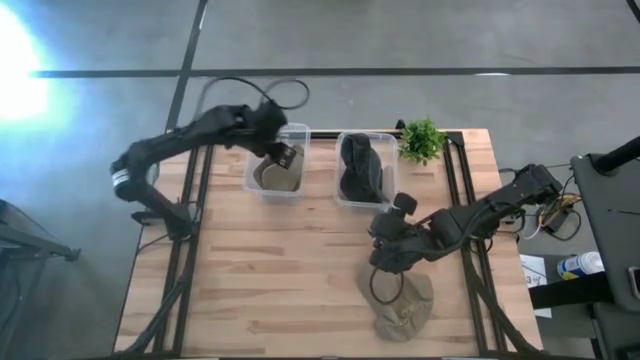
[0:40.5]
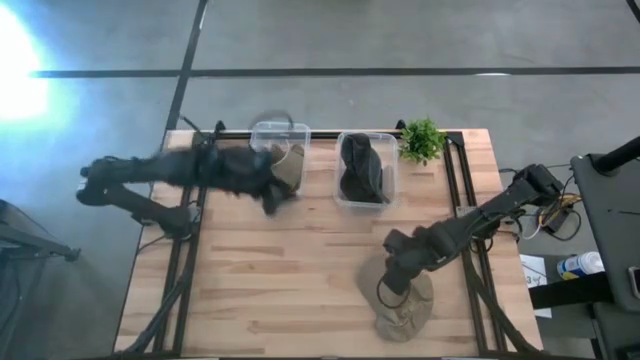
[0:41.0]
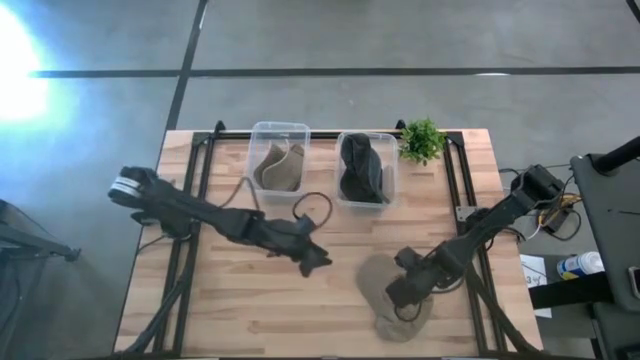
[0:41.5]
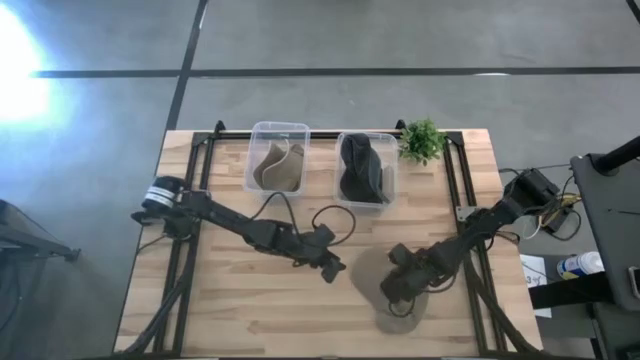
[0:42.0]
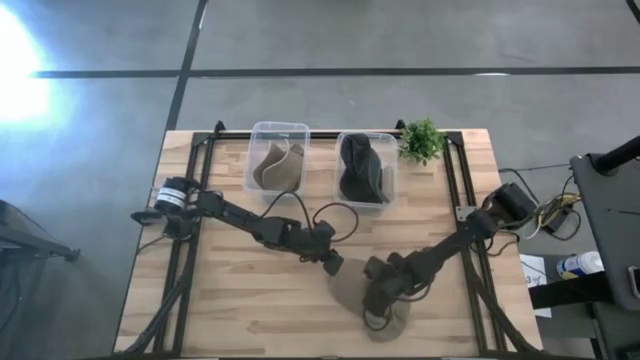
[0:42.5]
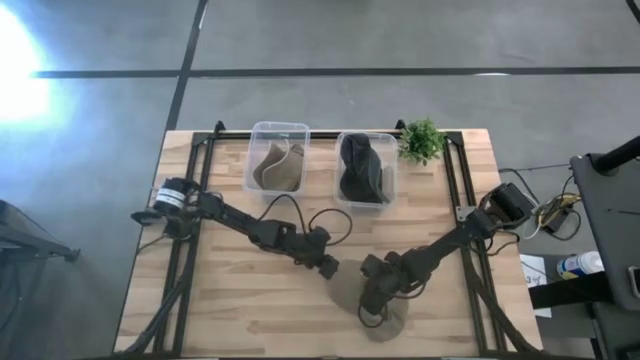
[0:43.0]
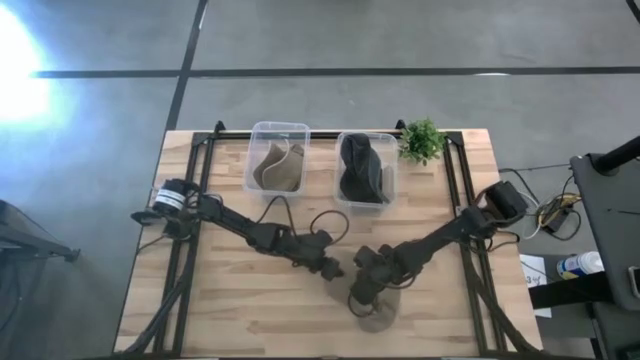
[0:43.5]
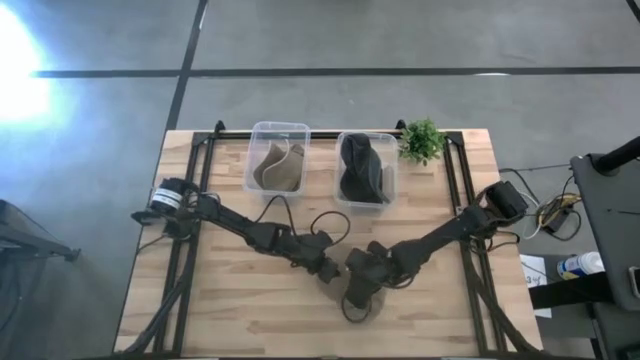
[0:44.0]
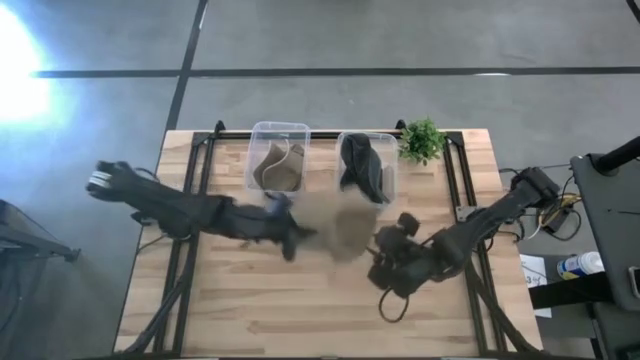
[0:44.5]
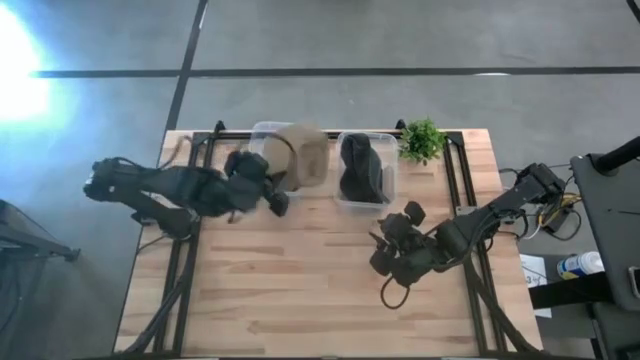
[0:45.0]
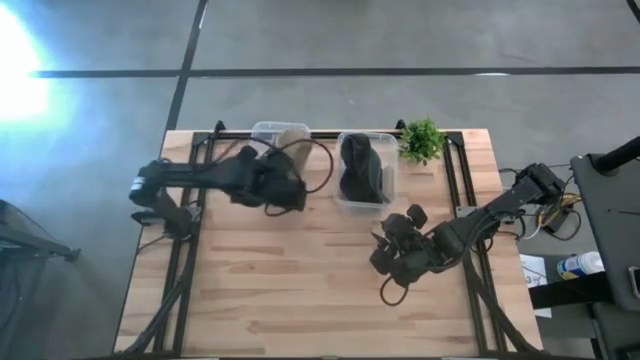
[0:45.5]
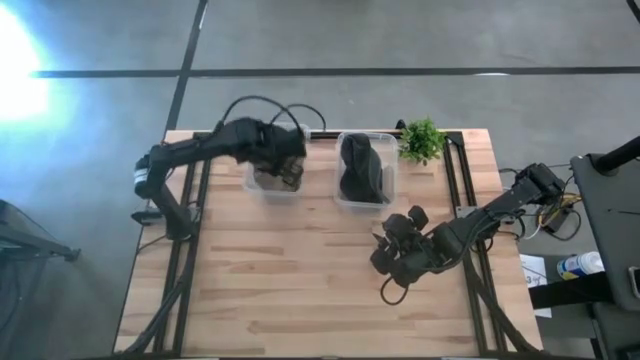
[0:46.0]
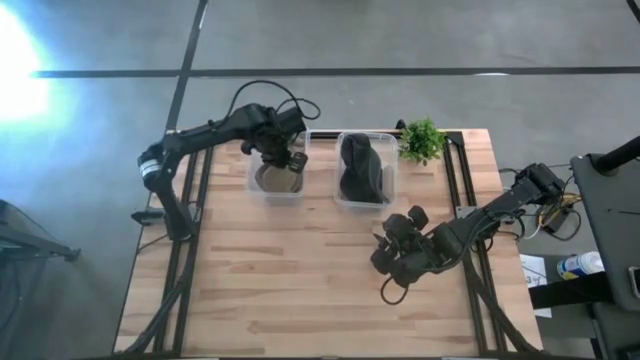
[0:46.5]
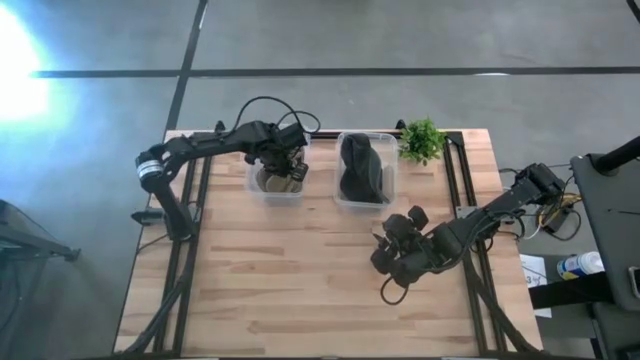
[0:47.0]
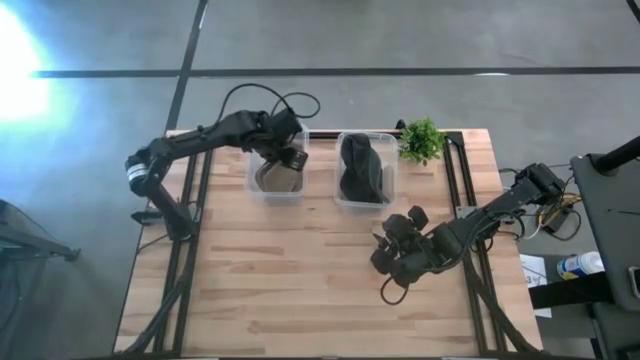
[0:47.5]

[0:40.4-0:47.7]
Task: Pick & Place hat
Put the brown cap into the left transparent bin

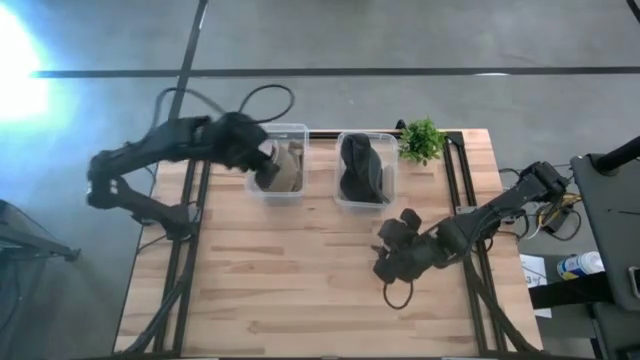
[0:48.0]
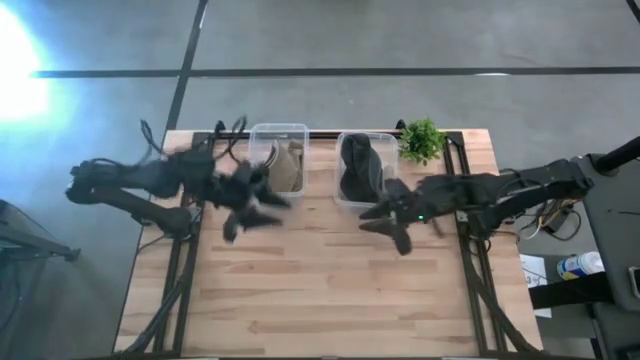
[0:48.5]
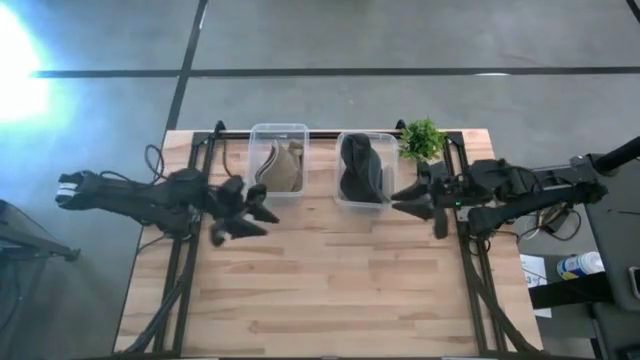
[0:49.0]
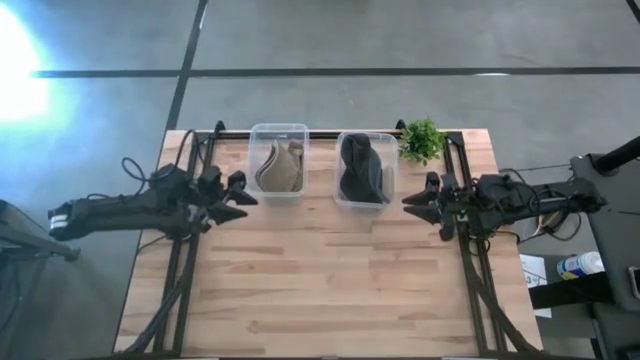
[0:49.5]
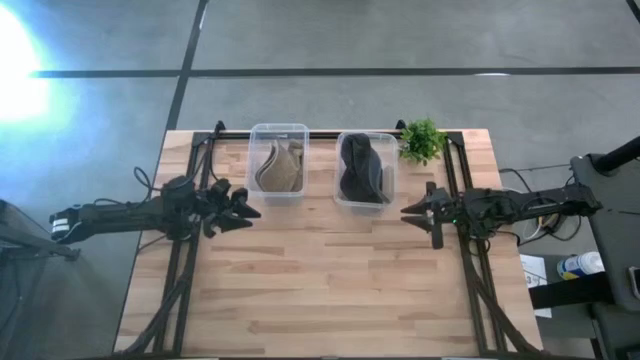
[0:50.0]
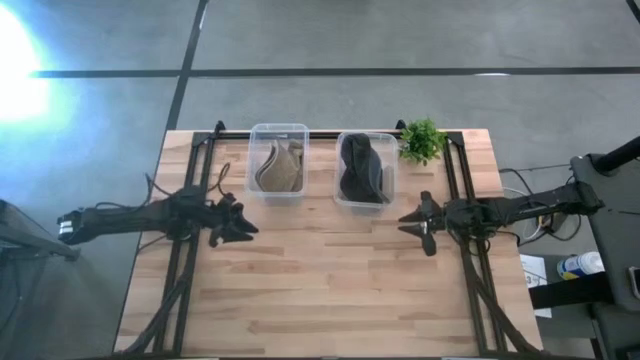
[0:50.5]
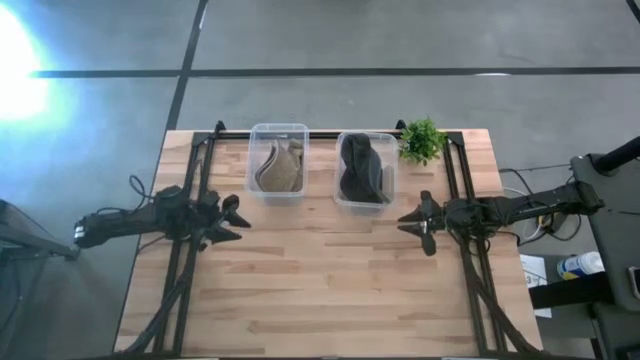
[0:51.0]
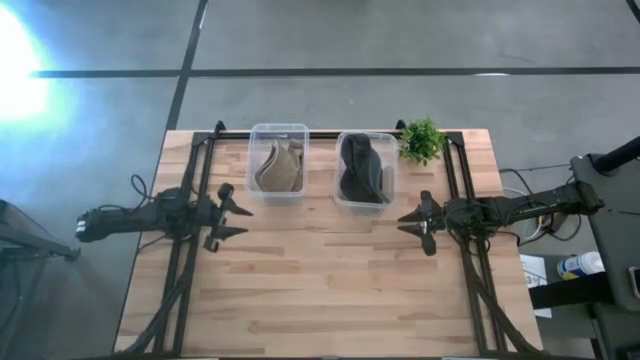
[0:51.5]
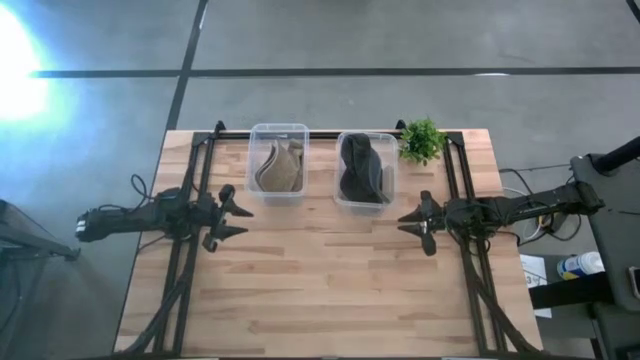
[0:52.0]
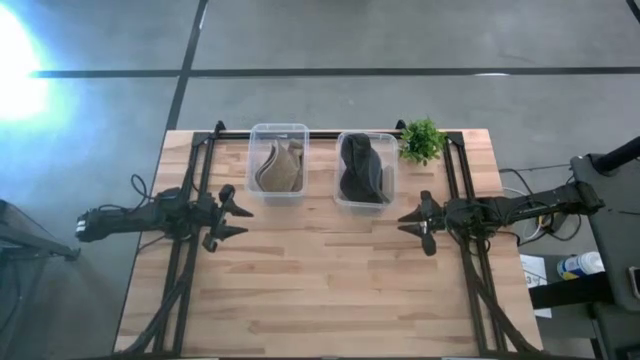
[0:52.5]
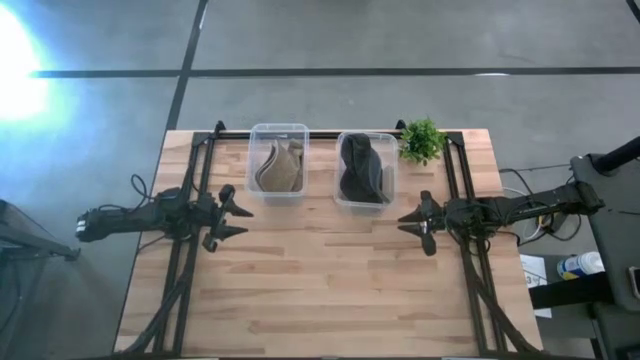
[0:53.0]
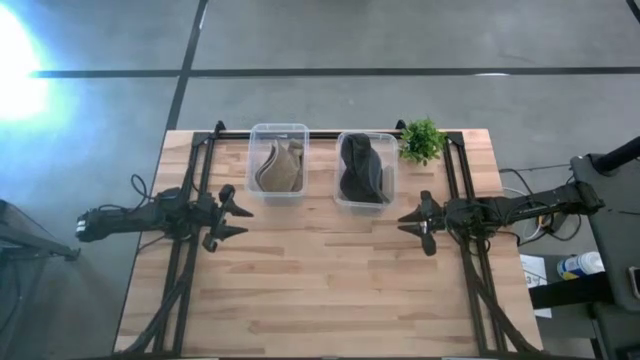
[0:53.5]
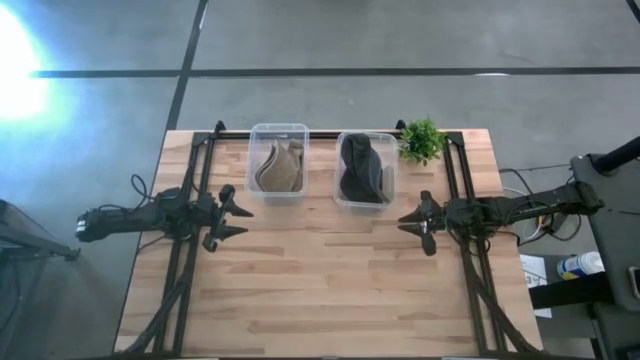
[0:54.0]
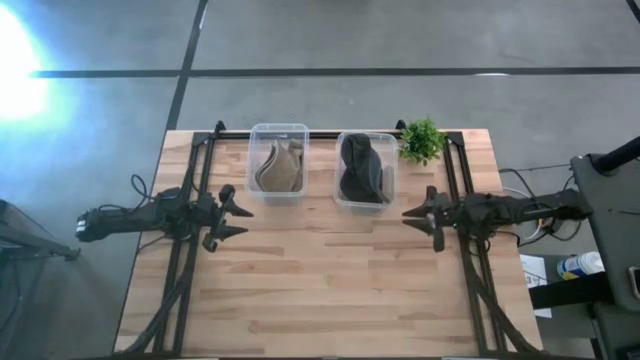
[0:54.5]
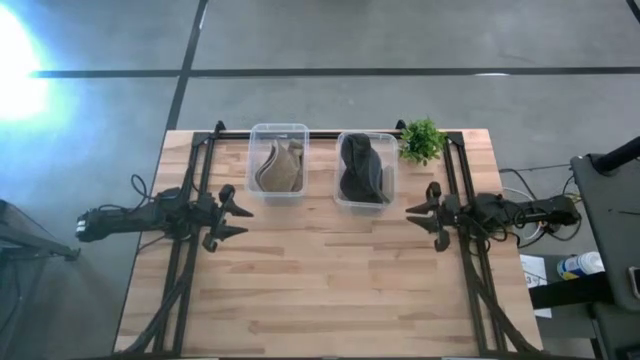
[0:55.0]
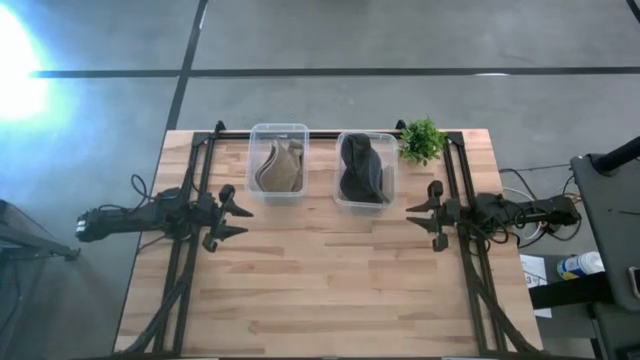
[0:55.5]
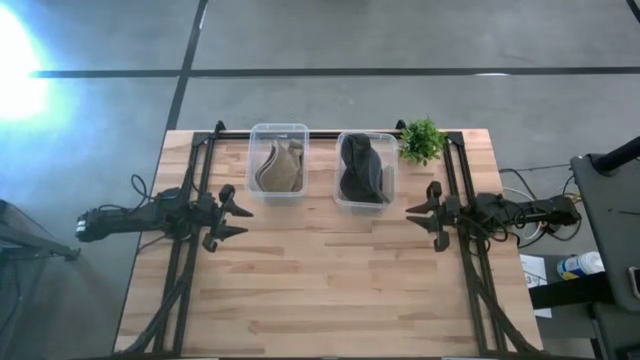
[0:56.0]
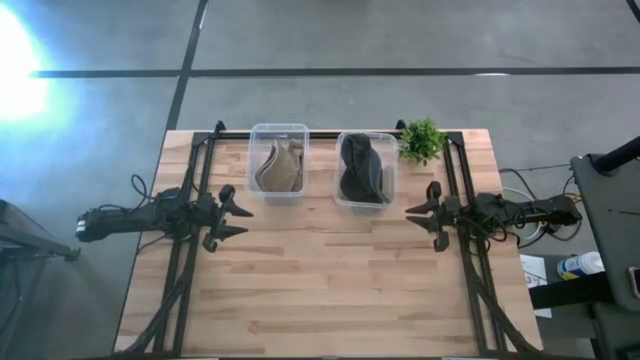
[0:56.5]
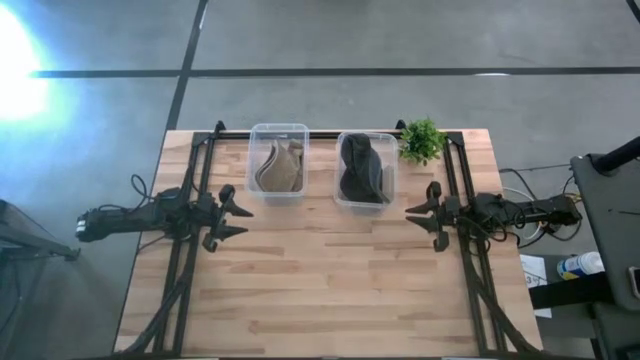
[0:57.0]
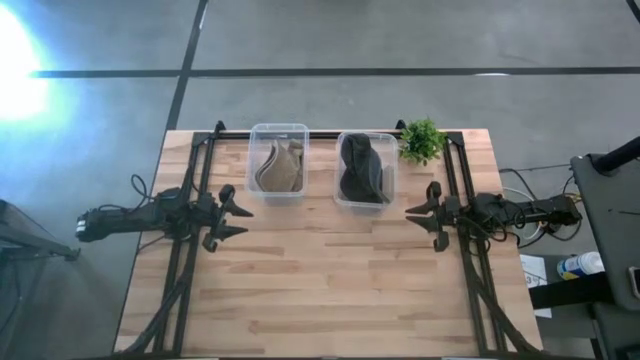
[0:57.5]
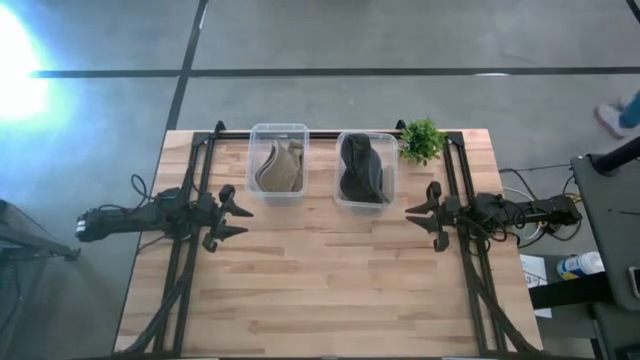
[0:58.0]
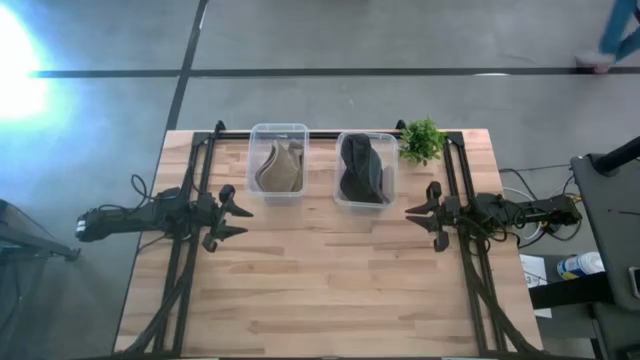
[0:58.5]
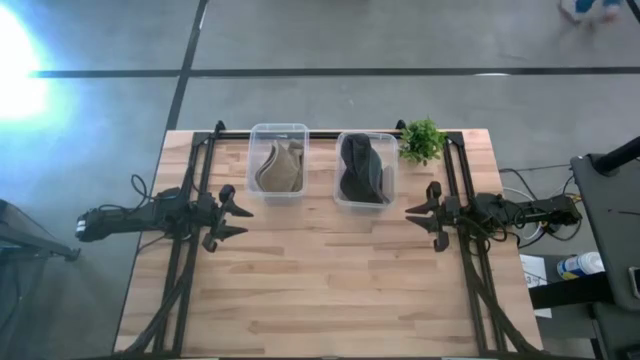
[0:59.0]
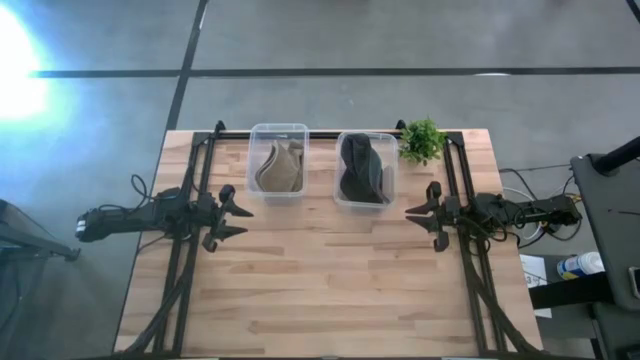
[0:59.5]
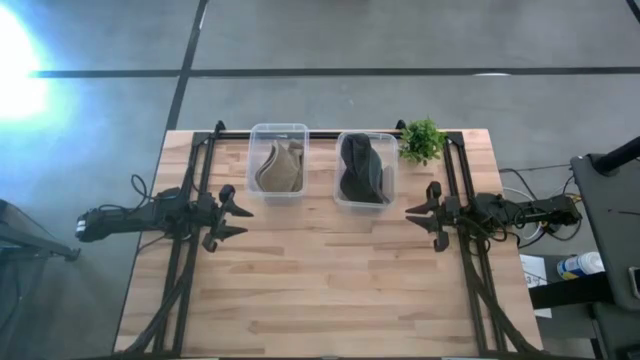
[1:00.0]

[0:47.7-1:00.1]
Return to Home Position

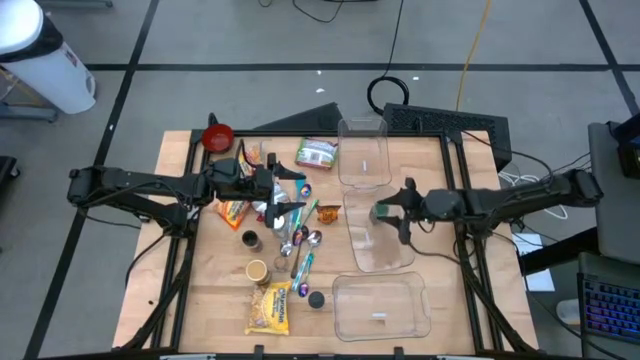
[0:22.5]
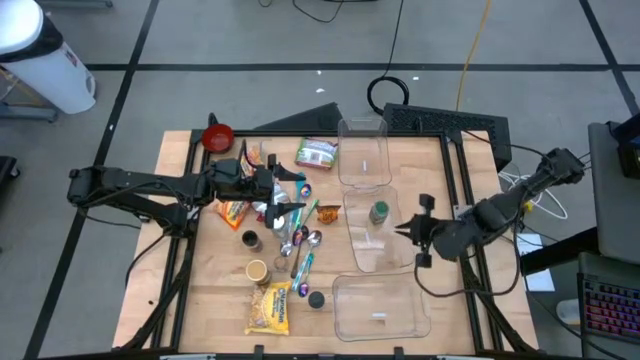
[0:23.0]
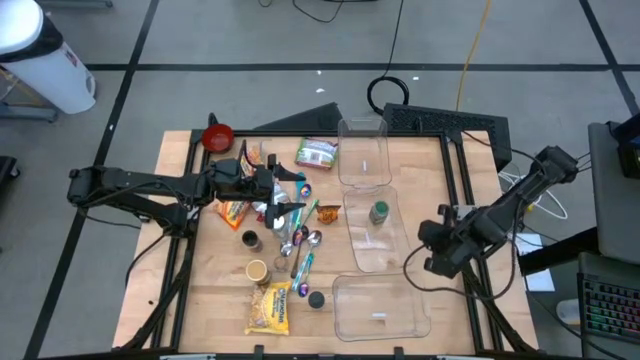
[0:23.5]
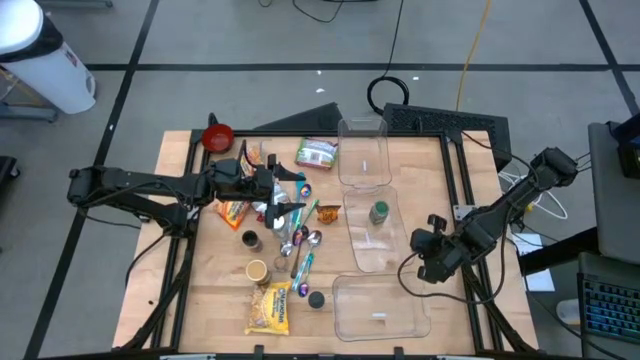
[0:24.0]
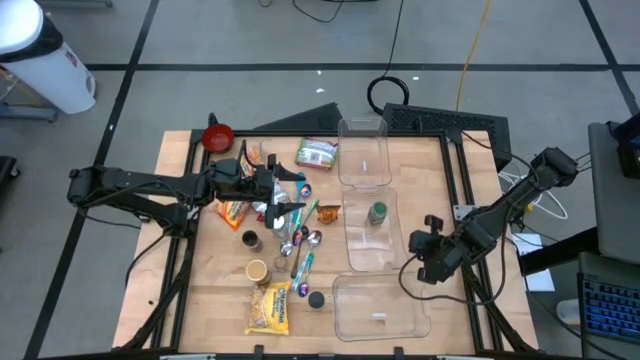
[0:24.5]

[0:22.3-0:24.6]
Task: Pick & Place Food Item
Adjust the middle transparent bin
